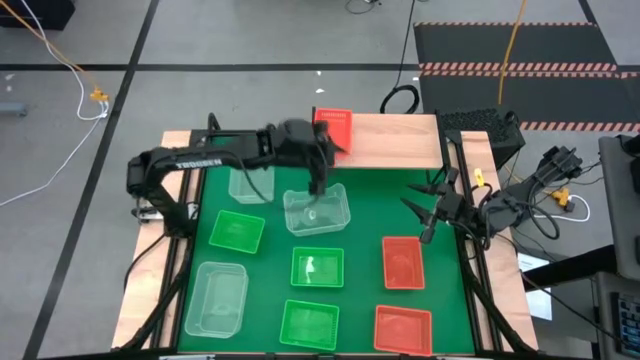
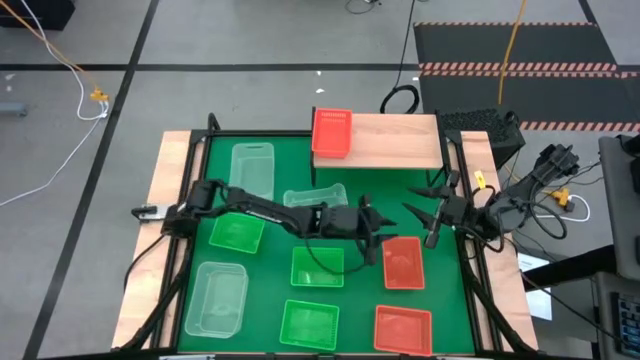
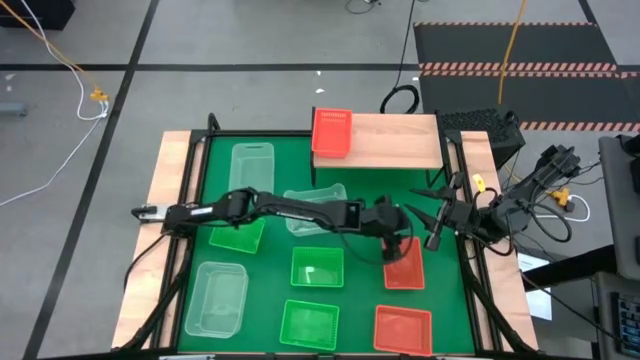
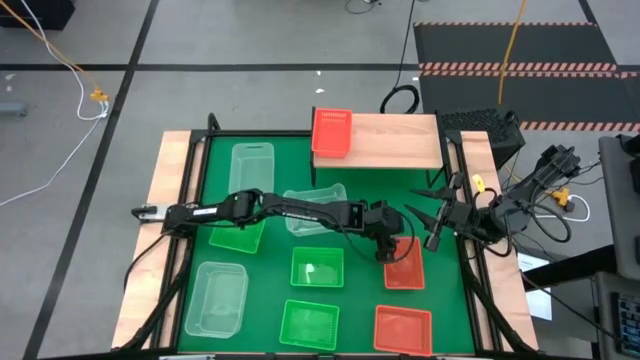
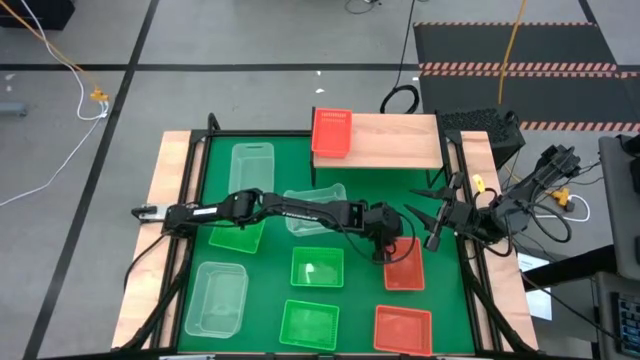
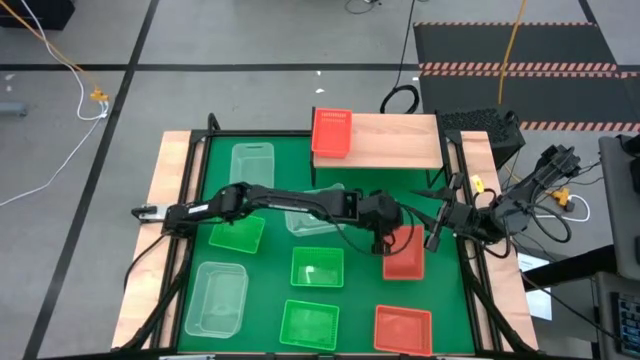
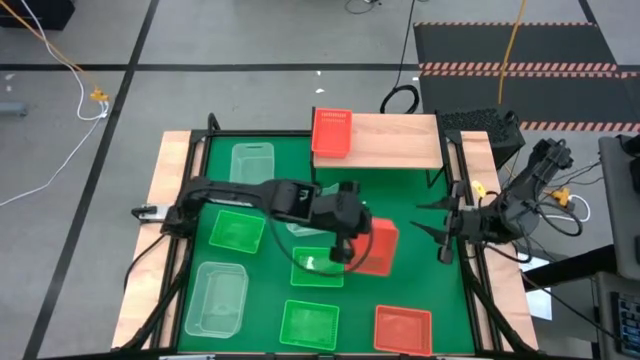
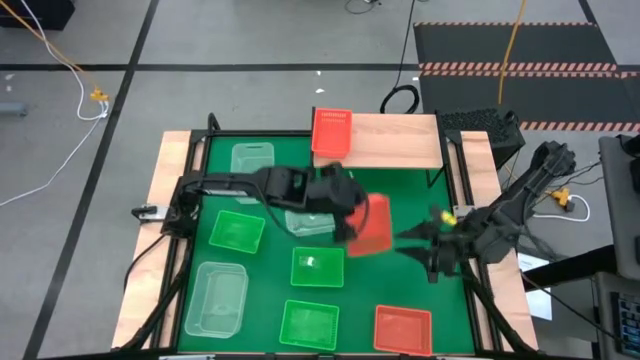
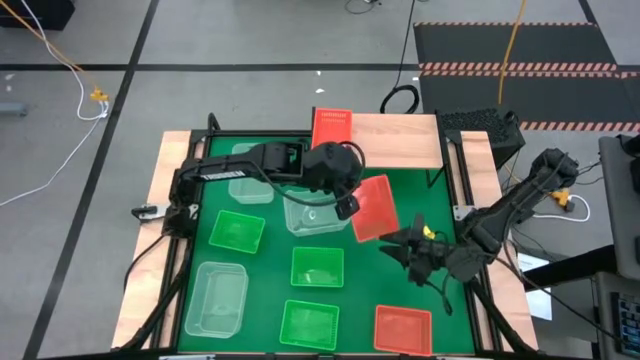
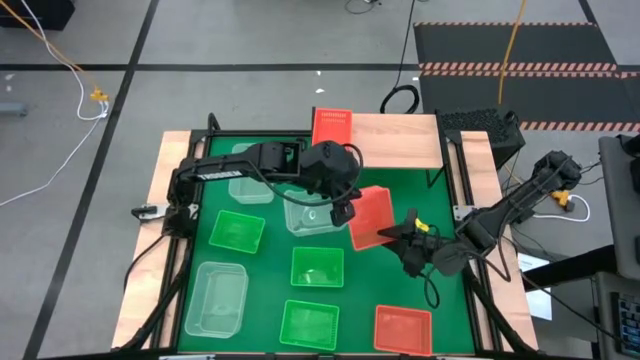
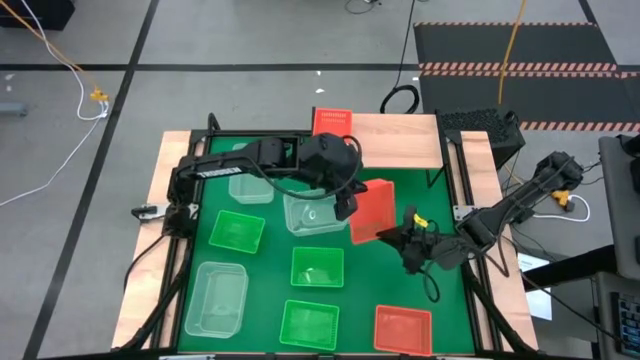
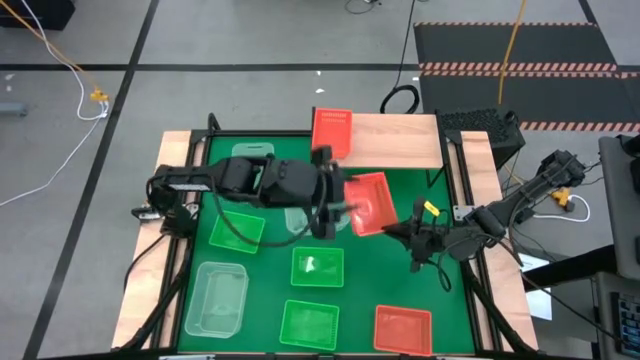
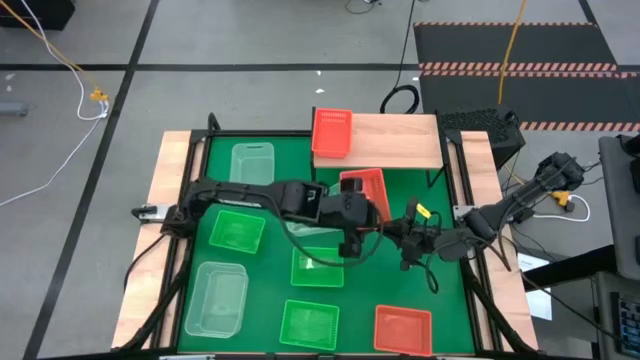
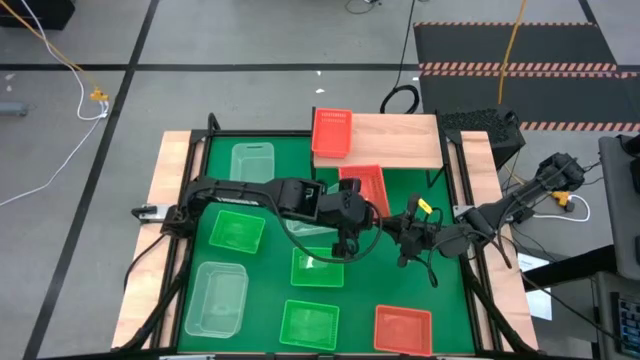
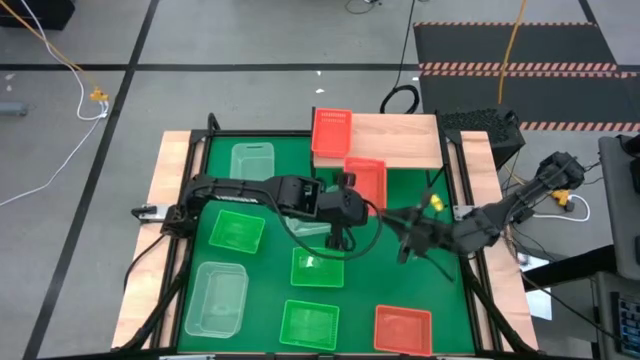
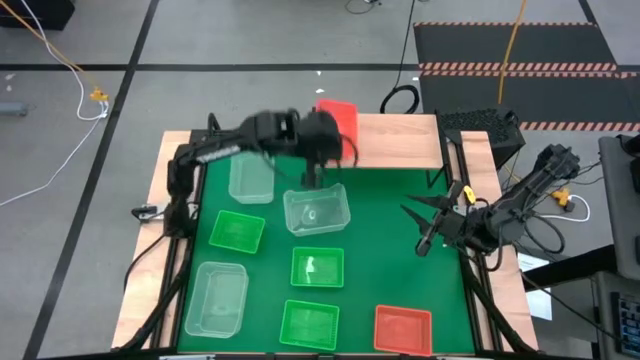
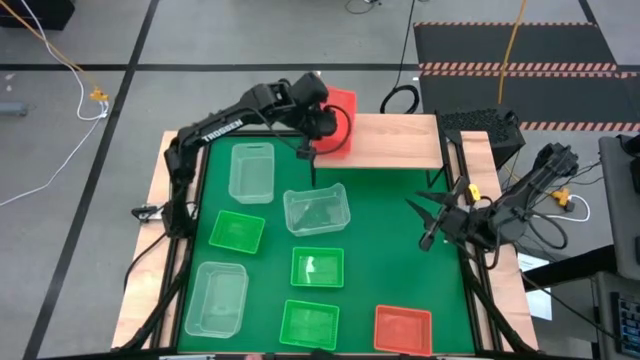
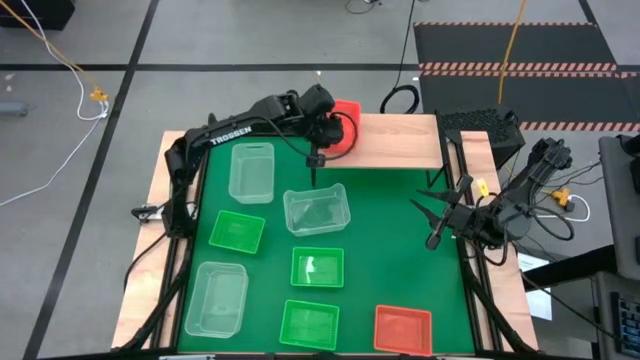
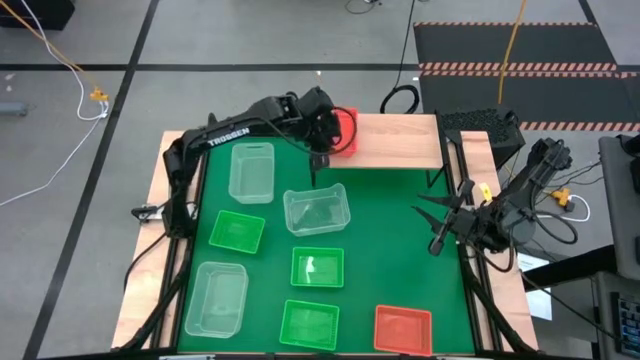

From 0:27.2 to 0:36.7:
Task: Stack baskets on shelf by color
Stack the top orange bin on the top of the orange bin

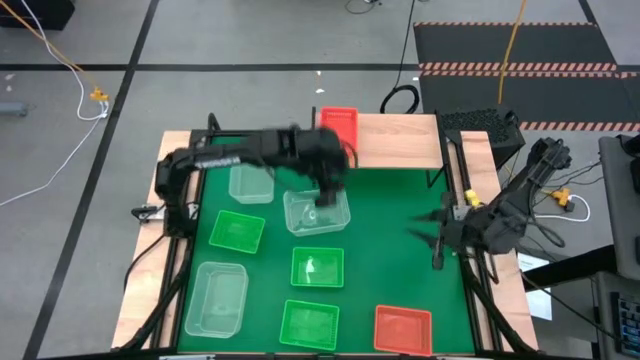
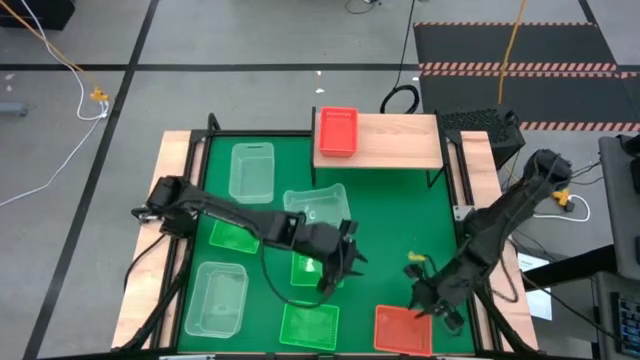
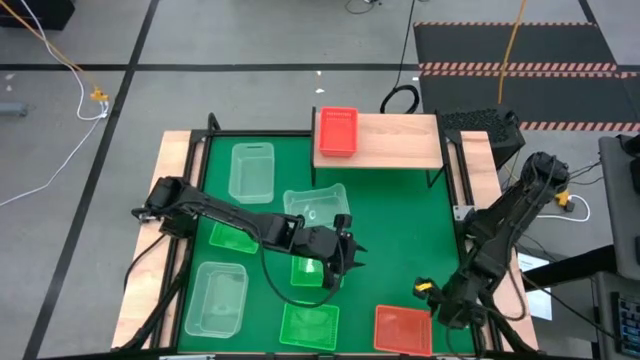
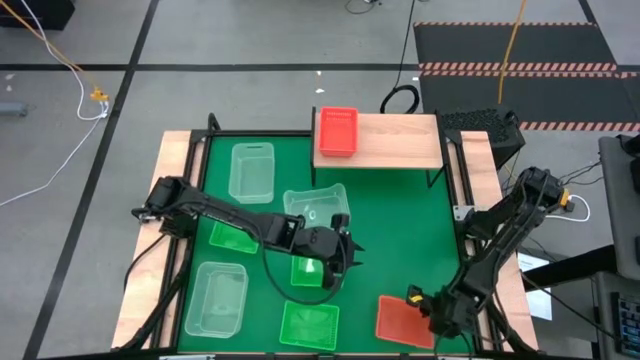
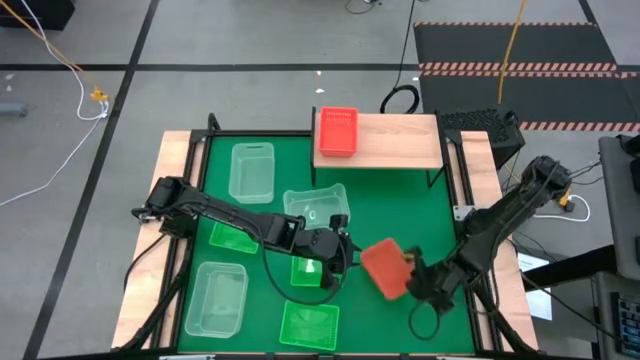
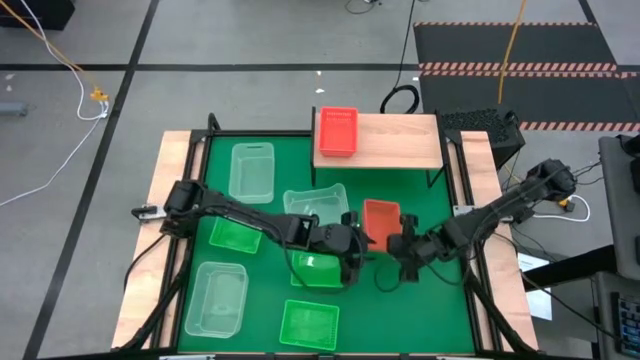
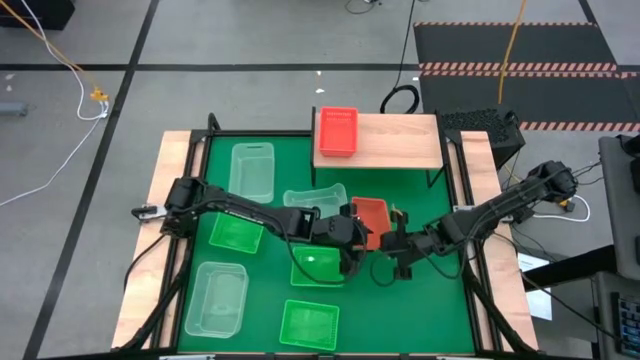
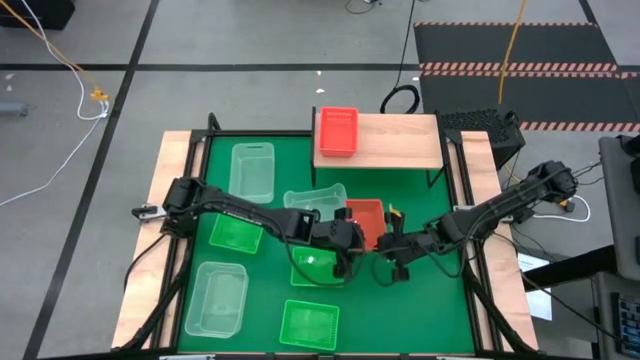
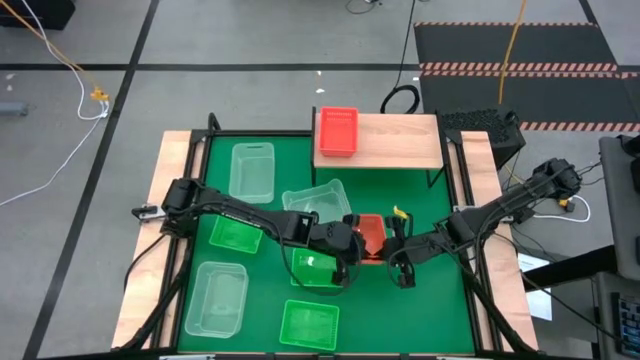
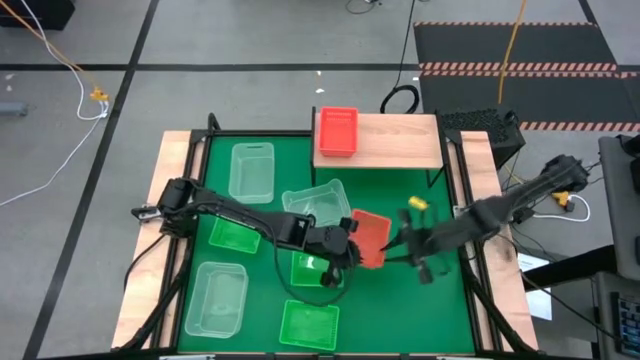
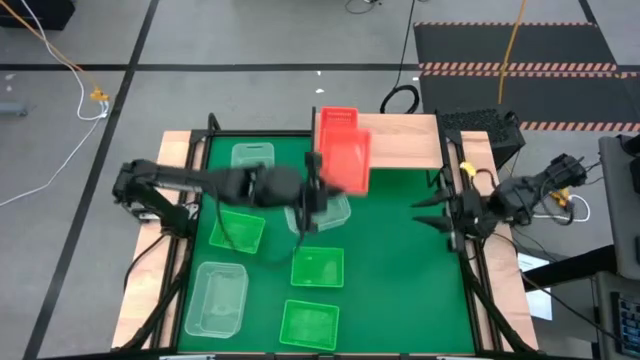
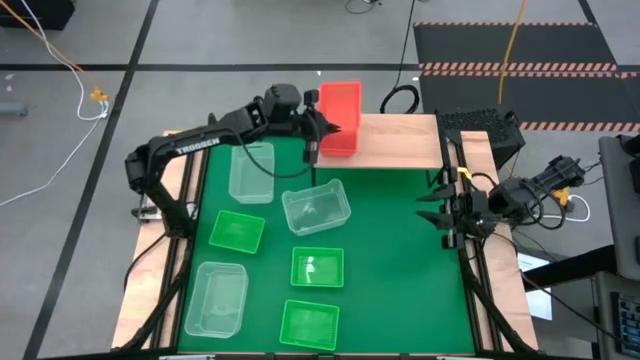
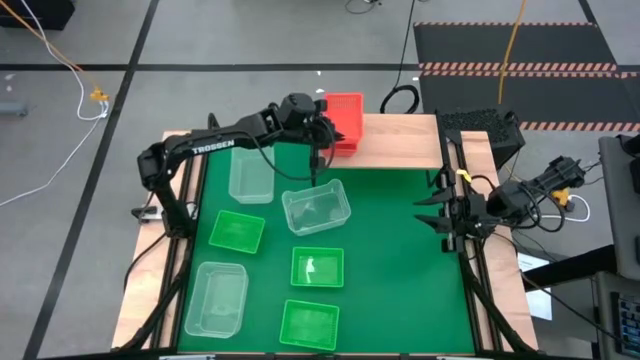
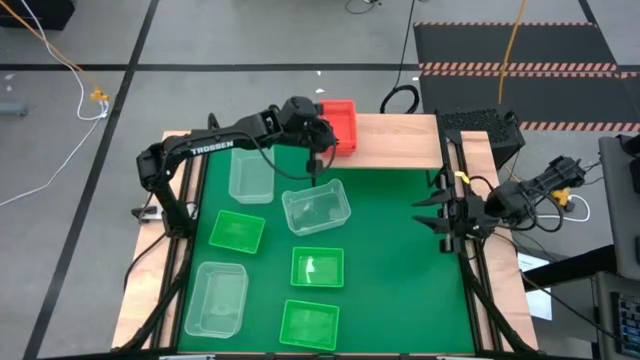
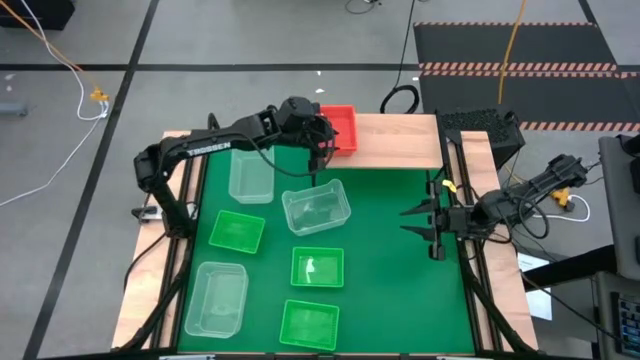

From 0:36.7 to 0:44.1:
Stack the orange bin on the top of the orange bin

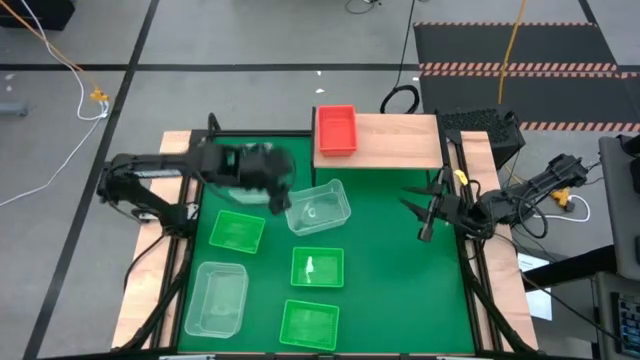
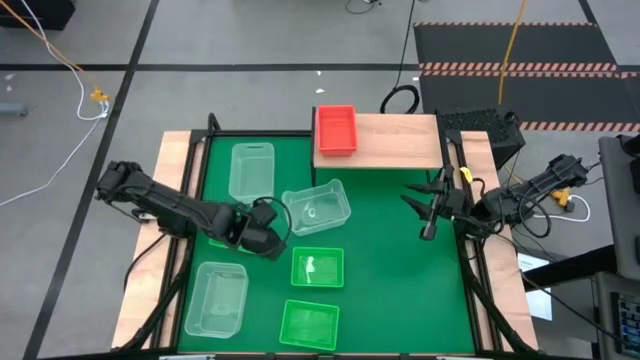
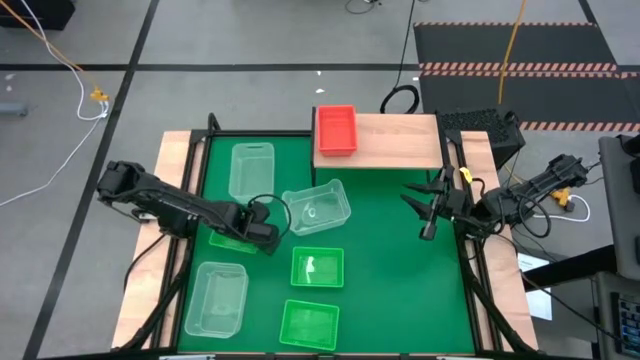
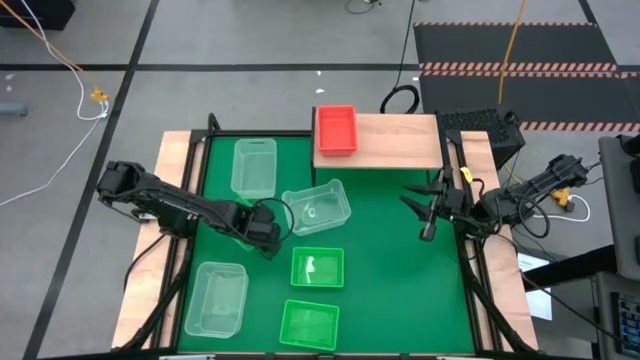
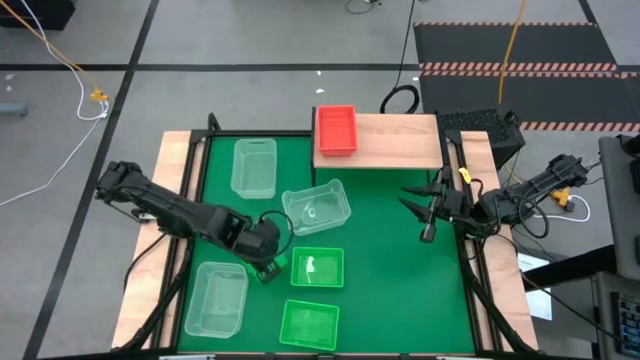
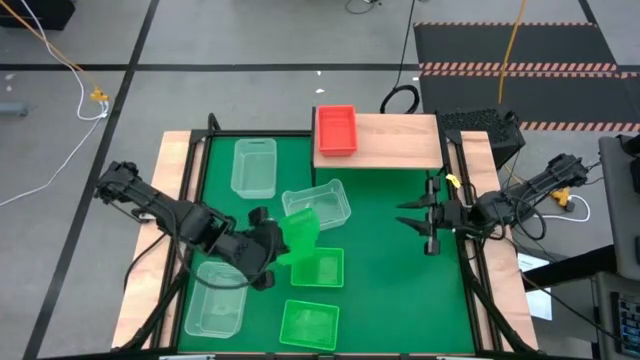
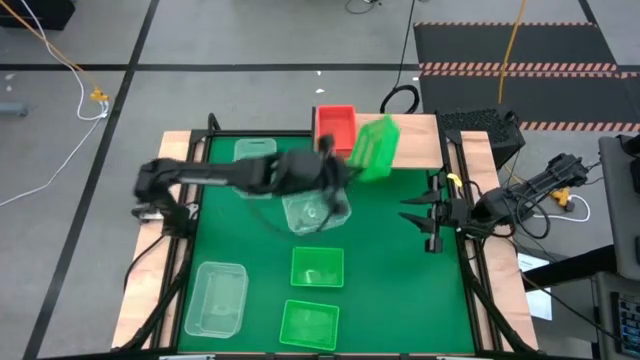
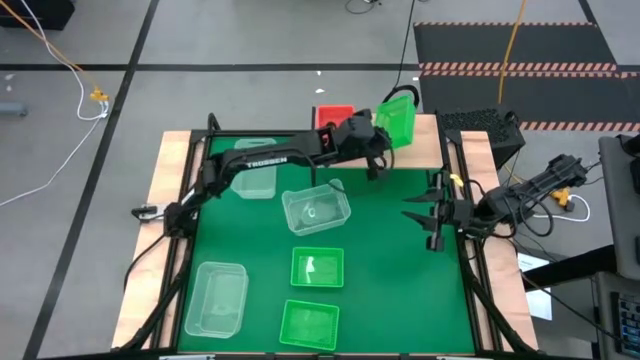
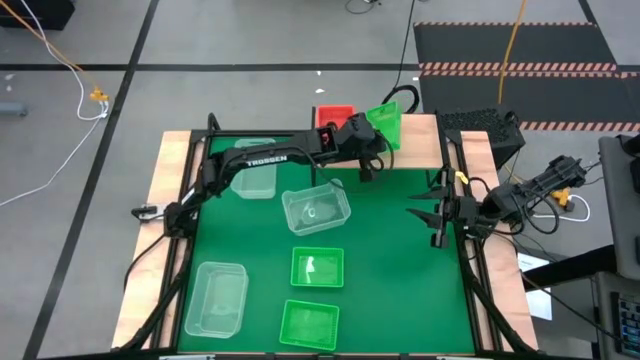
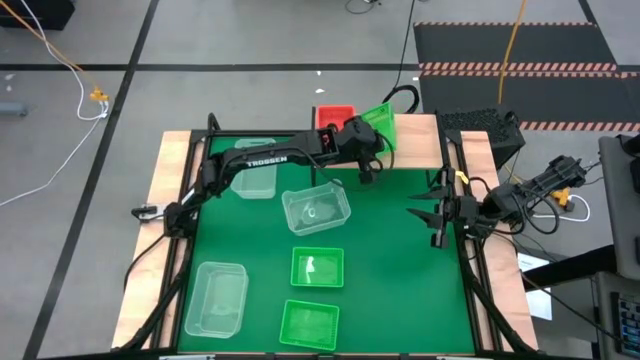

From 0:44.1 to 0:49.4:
Put the top left green bin on the shelf
